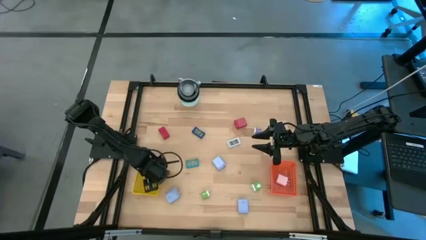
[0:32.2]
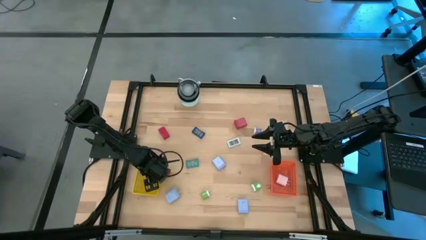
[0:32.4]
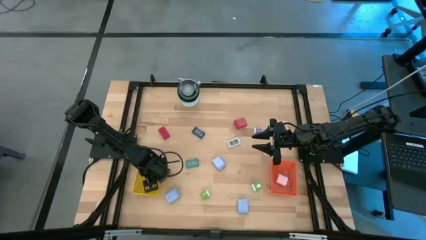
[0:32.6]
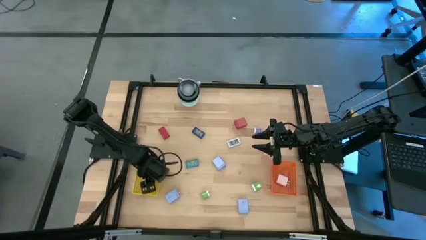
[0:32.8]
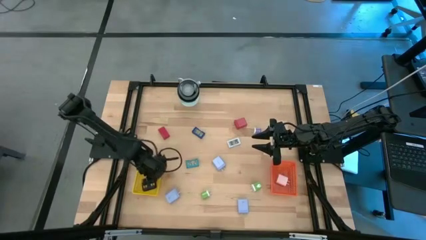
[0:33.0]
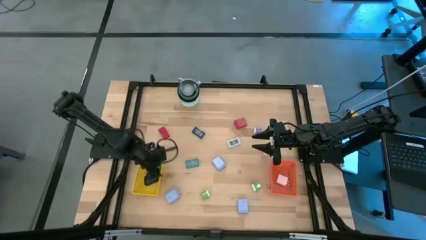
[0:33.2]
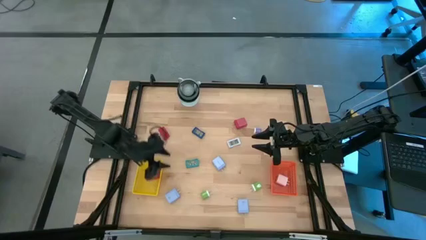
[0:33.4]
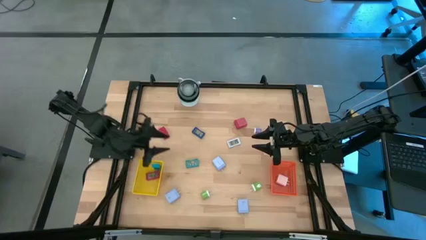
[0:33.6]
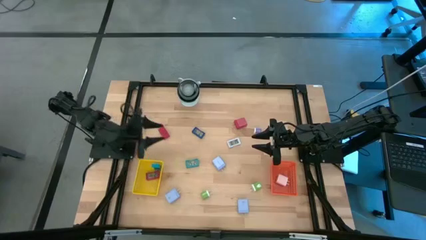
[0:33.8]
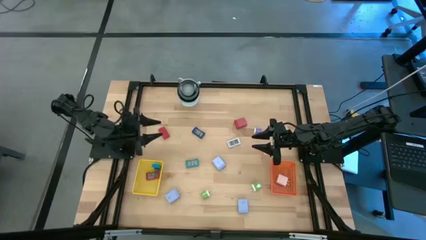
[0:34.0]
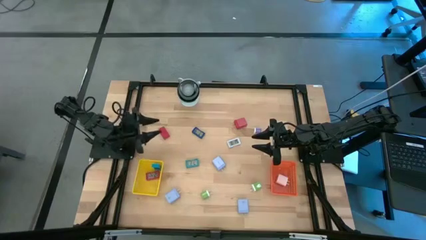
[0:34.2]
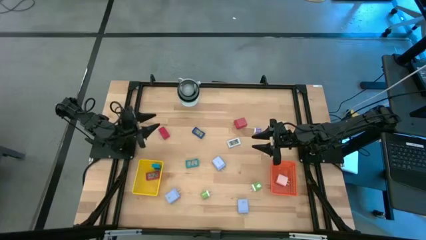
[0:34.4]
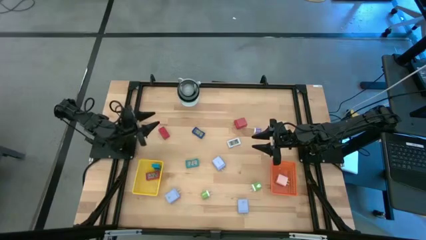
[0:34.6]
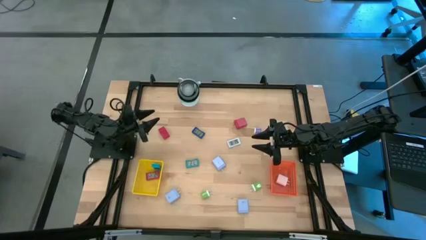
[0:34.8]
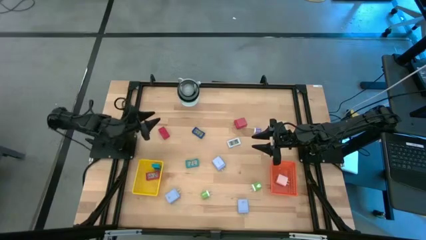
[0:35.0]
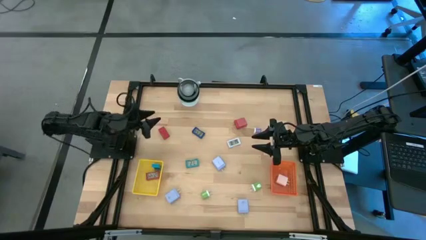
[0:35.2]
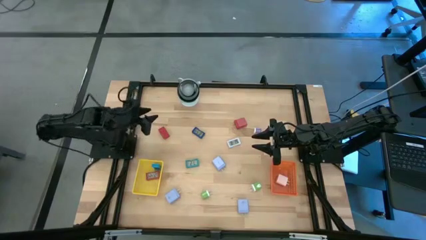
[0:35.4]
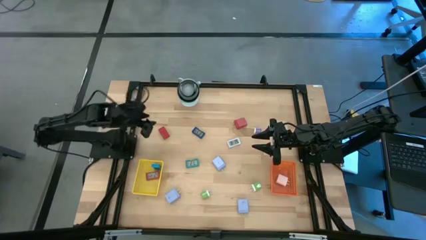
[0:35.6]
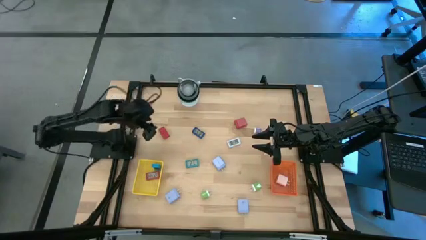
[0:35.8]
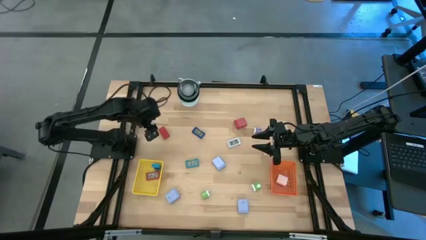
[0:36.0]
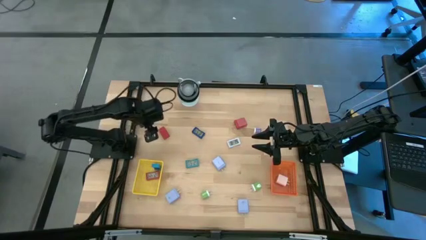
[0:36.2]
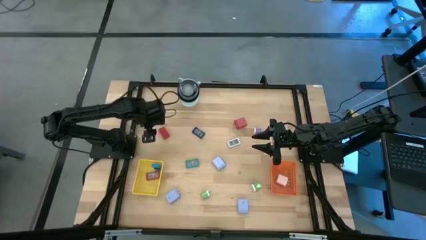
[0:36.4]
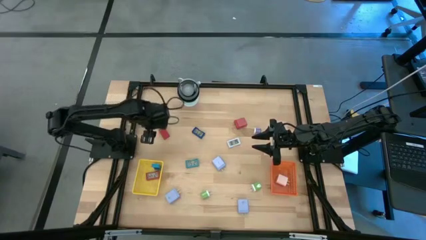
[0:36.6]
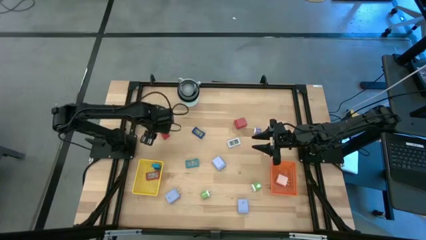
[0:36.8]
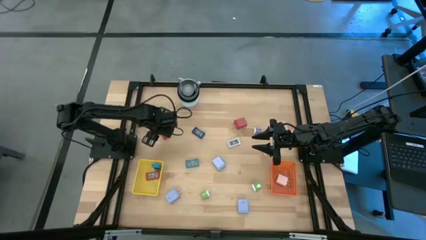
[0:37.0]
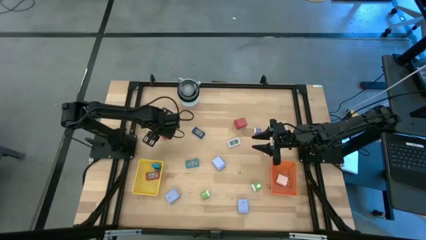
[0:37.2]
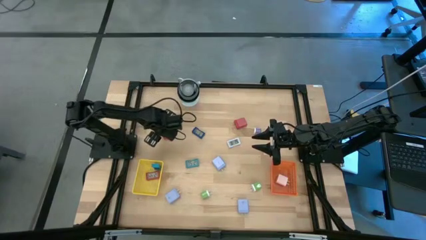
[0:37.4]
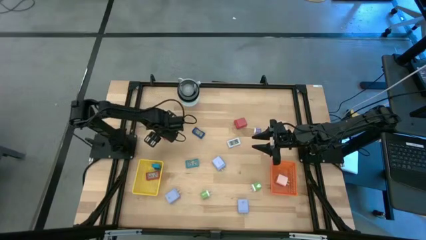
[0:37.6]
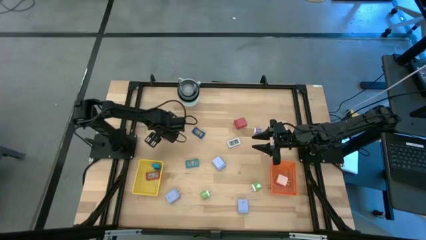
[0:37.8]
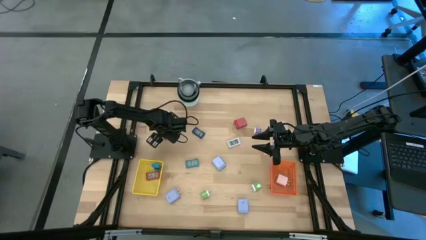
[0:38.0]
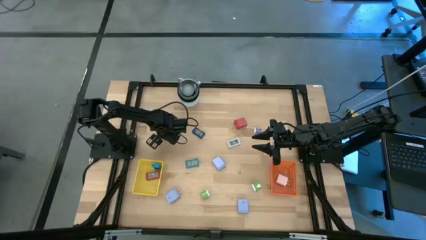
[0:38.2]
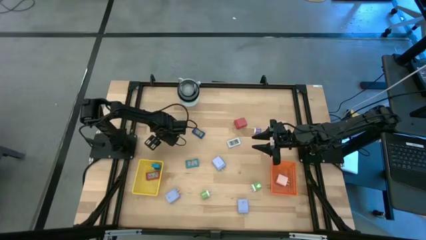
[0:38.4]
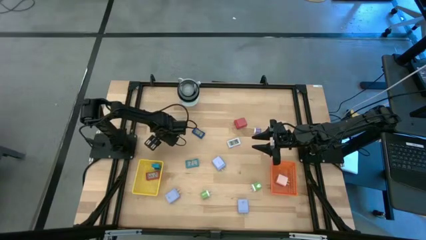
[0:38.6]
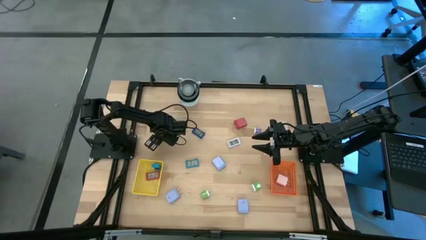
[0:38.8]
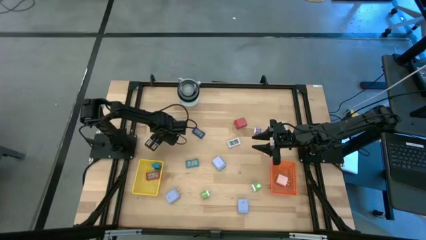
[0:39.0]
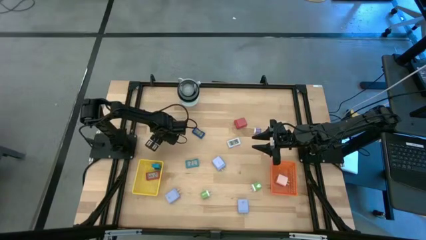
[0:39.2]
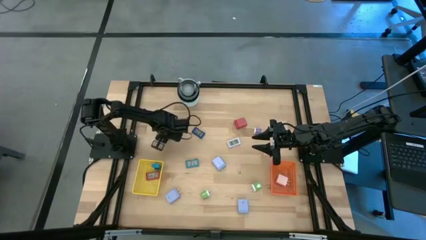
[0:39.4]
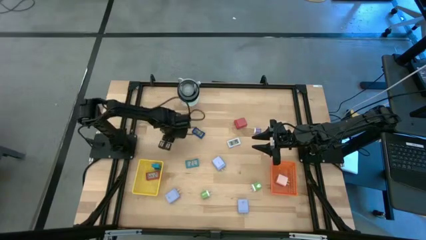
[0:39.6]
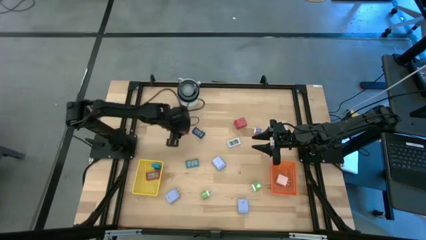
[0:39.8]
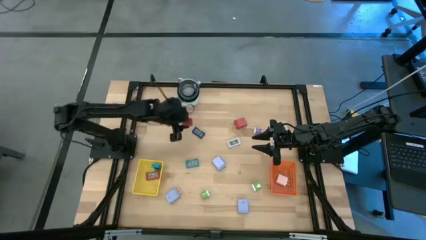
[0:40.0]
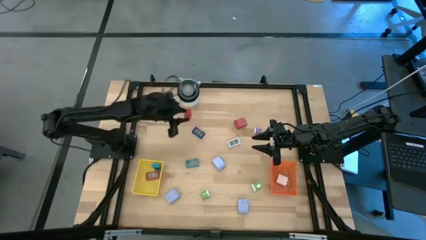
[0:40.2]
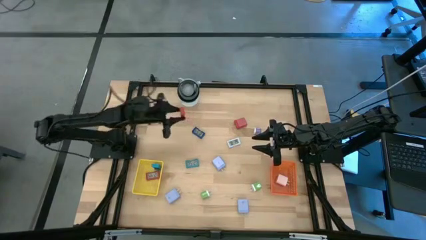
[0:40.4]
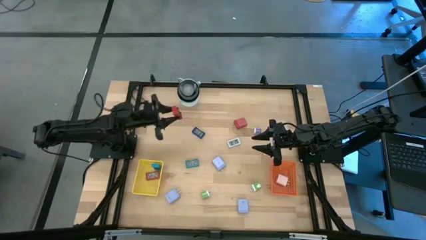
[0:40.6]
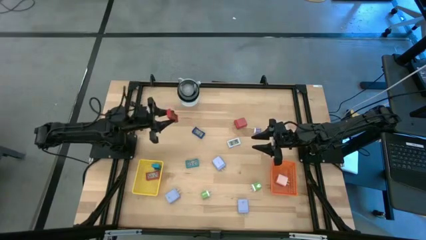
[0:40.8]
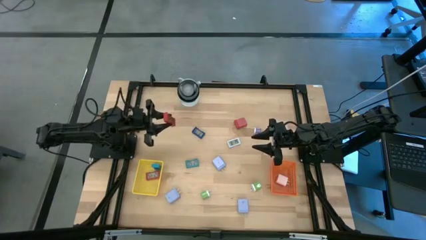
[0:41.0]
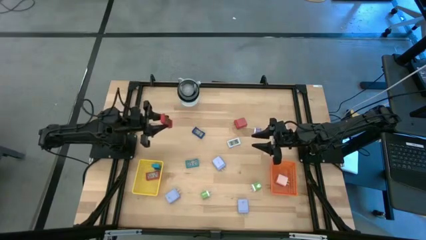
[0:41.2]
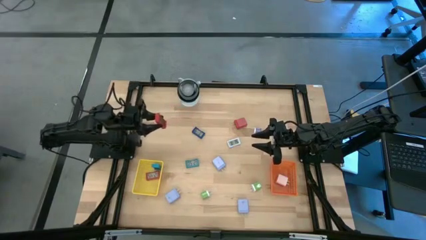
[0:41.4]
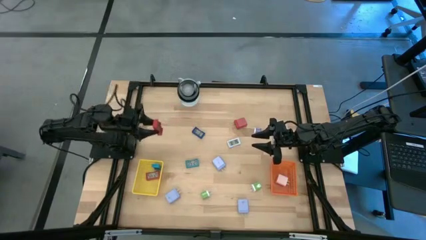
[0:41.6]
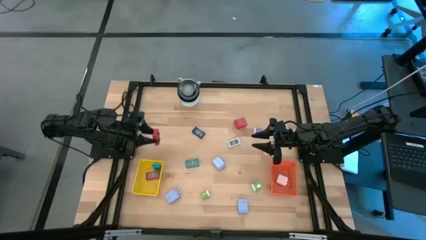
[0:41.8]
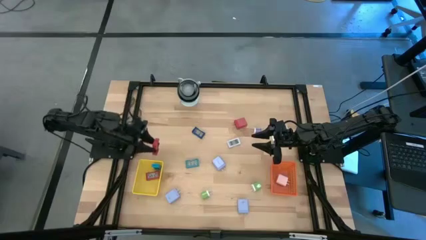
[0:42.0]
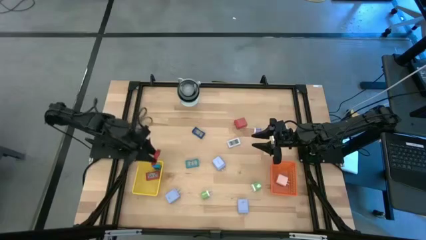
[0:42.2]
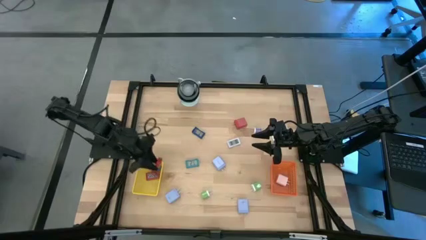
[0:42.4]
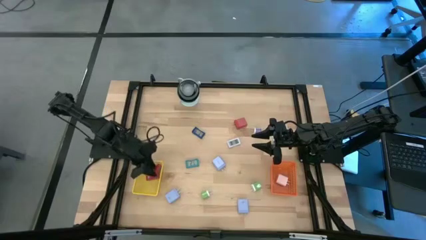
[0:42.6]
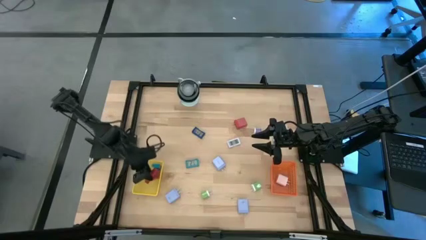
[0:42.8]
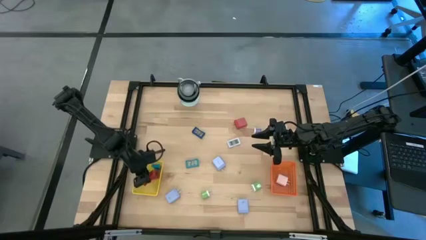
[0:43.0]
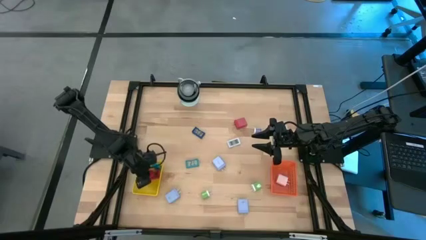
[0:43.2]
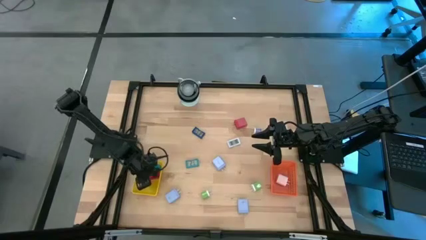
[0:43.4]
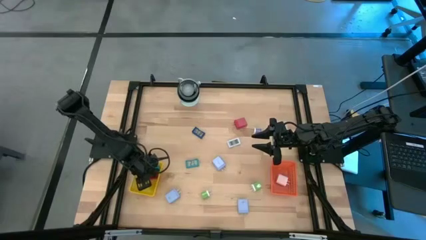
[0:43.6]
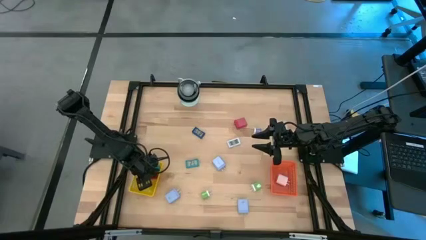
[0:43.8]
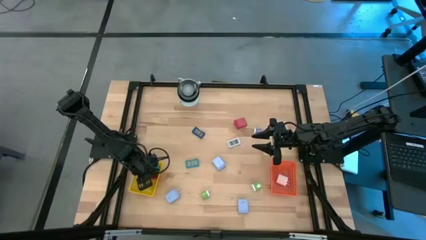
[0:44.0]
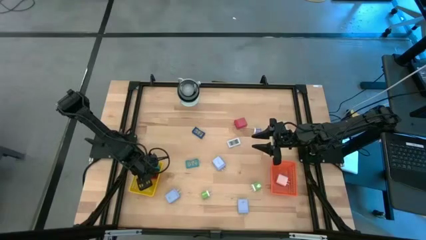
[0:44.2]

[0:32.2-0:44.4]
Task: Pick & Place Office items
Put the red digital timer into the yellow basket

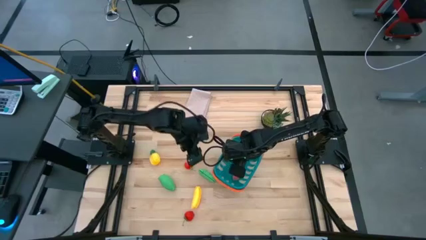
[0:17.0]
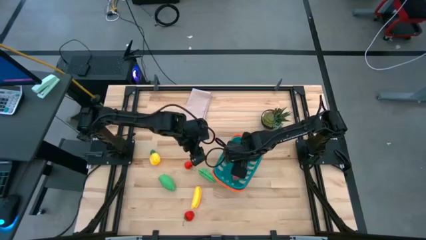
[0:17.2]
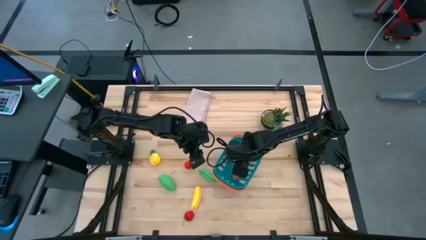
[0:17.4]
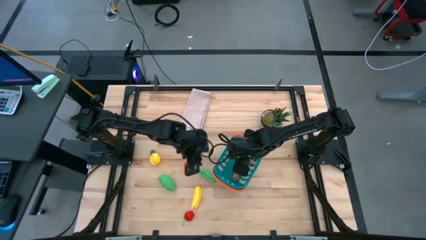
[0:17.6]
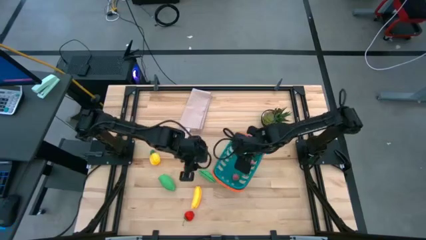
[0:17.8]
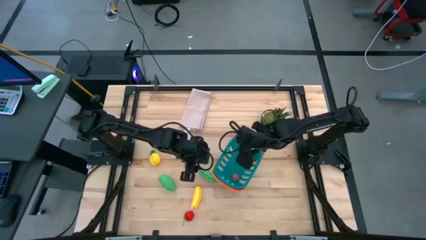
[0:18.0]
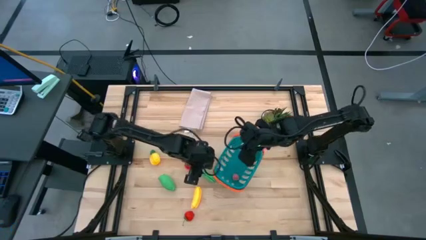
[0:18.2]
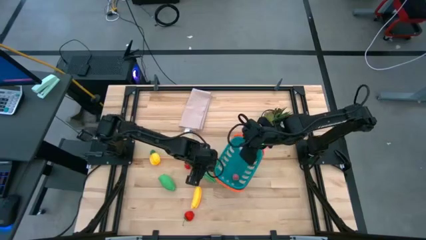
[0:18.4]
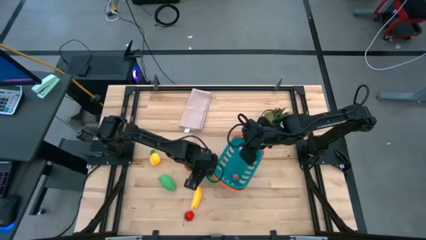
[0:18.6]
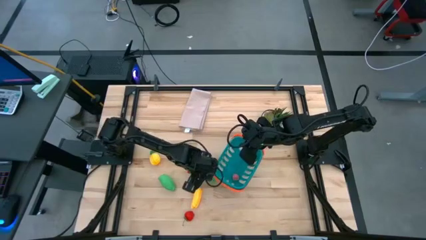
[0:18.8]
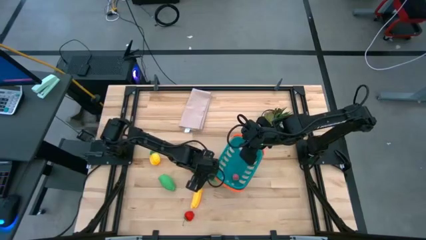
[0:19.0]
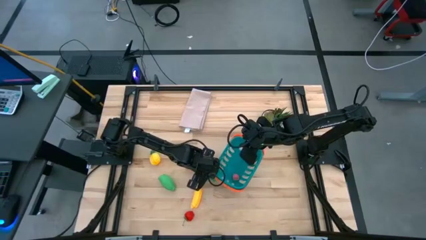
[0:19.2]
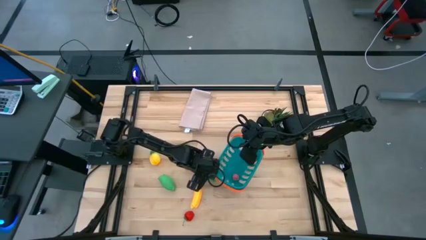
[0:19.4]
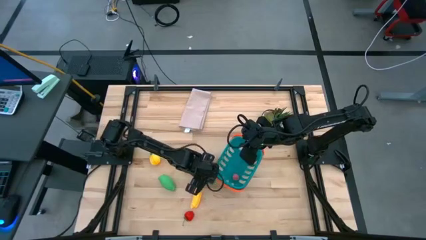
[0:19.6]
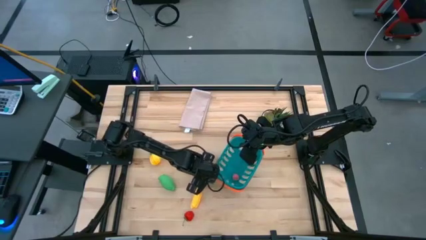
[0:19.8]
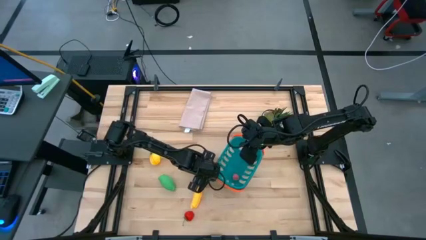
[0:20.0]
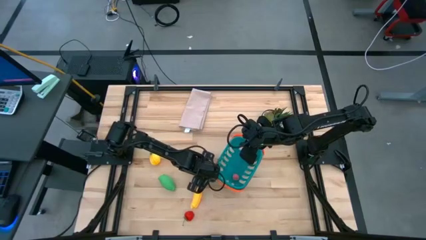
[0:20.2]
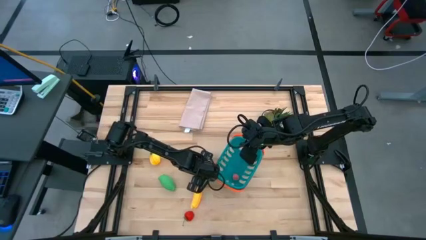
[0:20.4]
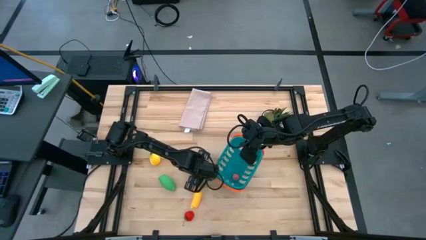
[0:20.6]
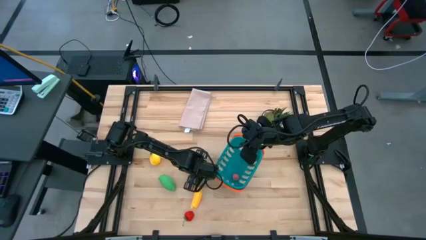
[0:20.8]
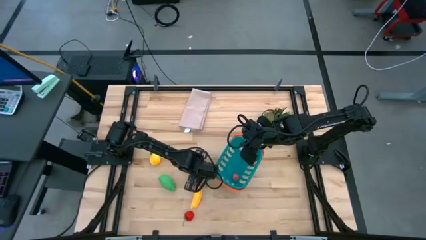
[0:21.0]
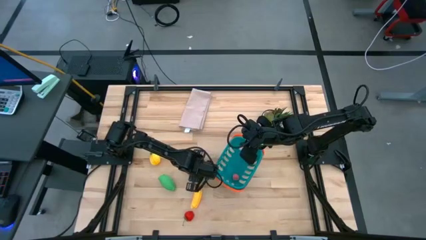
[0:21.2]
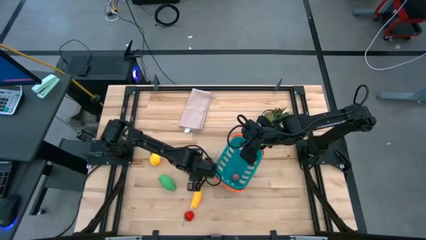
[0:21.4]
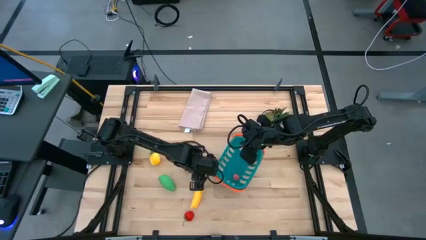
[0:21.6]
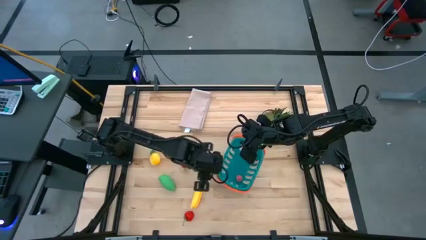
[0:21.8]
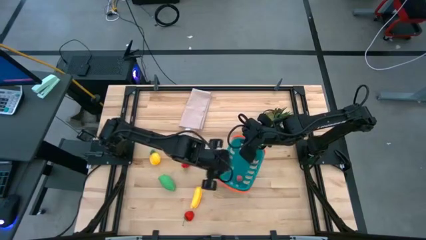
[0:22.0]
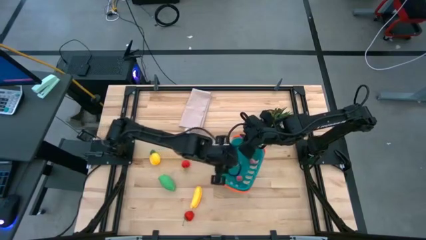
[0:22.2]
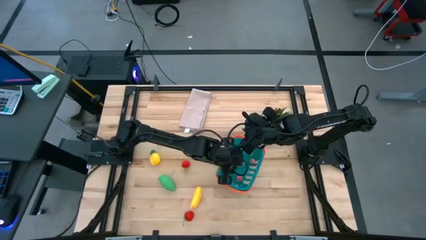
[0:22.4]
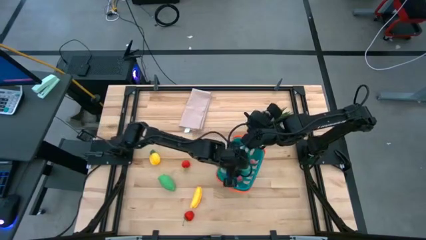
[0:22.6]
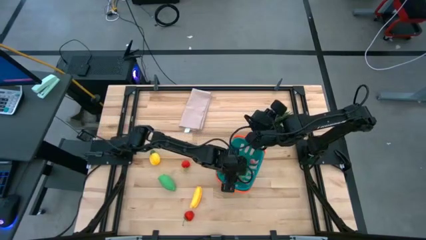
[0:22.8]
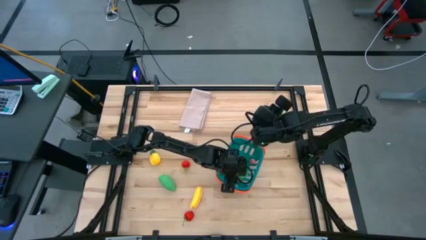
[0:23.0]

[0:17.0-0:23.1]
Task: Pick and placing Produce into tupperware
Put the green pea into the blue basket
